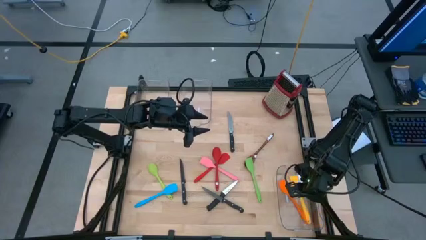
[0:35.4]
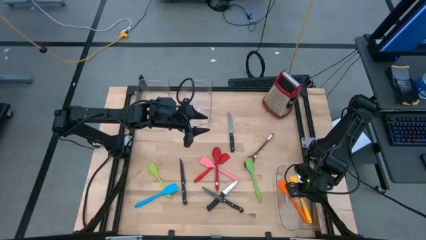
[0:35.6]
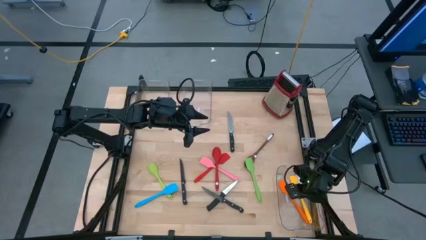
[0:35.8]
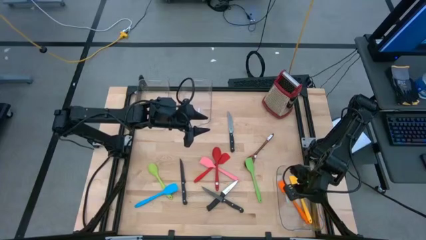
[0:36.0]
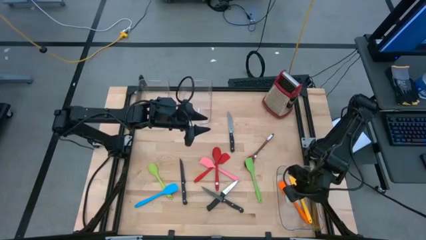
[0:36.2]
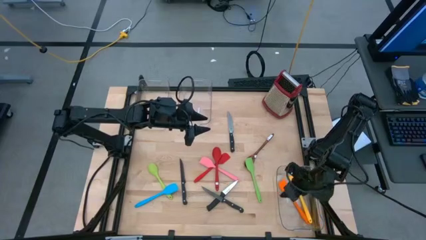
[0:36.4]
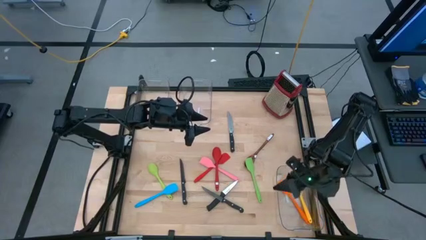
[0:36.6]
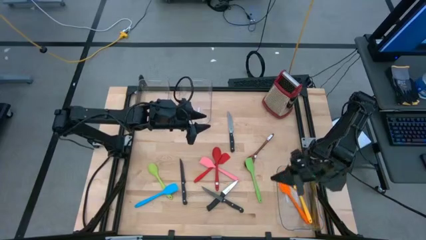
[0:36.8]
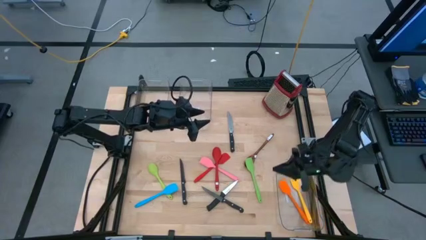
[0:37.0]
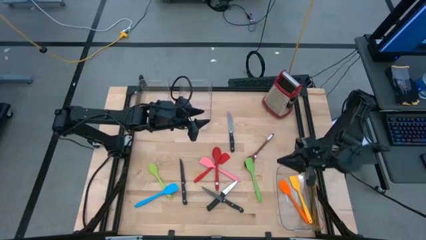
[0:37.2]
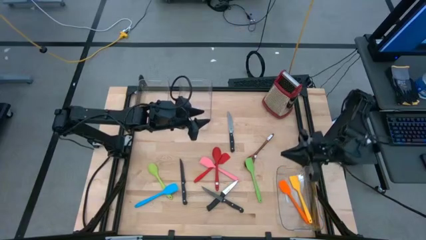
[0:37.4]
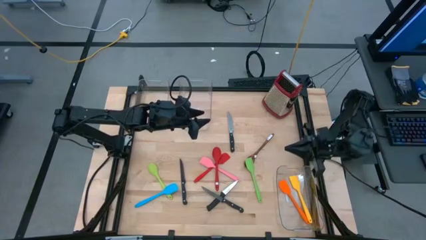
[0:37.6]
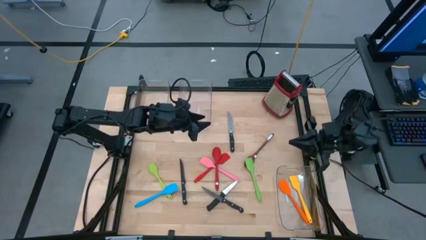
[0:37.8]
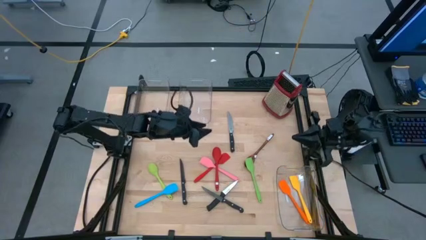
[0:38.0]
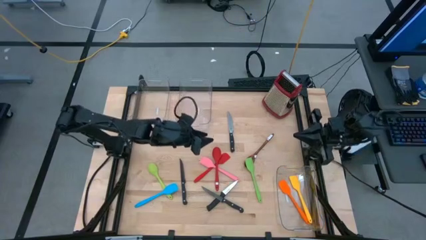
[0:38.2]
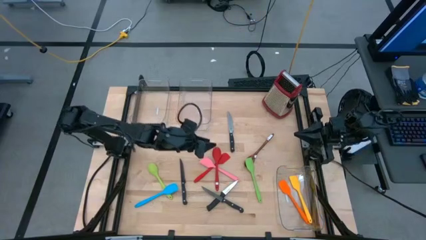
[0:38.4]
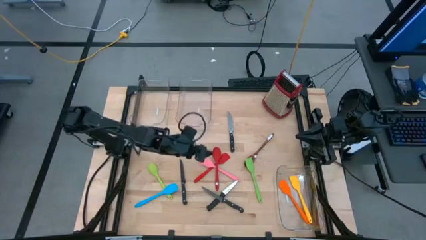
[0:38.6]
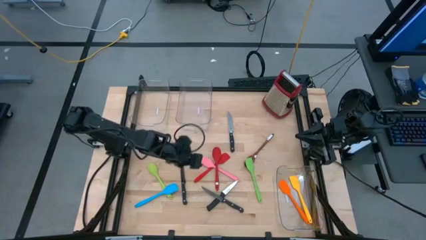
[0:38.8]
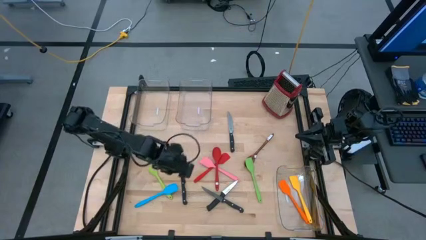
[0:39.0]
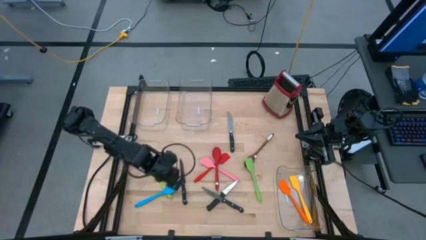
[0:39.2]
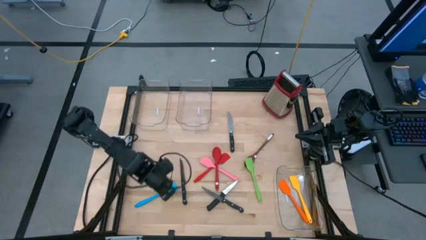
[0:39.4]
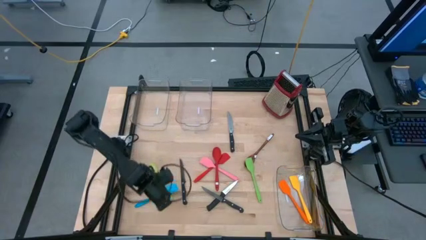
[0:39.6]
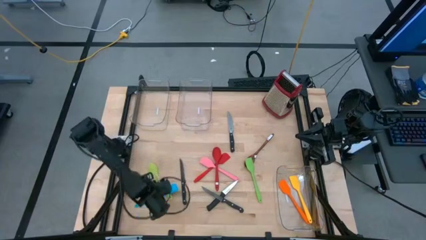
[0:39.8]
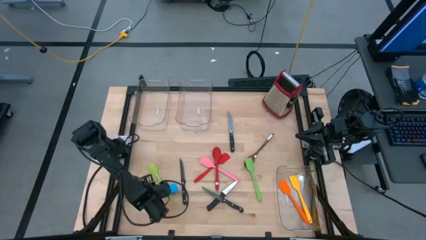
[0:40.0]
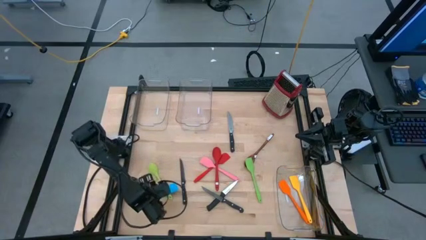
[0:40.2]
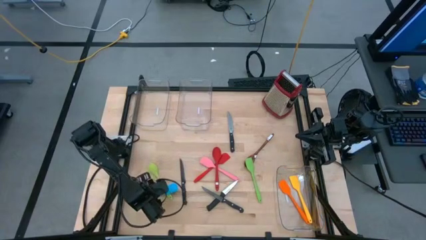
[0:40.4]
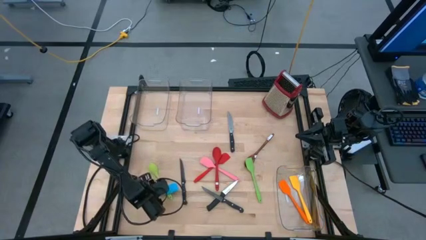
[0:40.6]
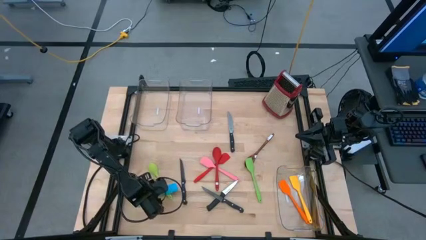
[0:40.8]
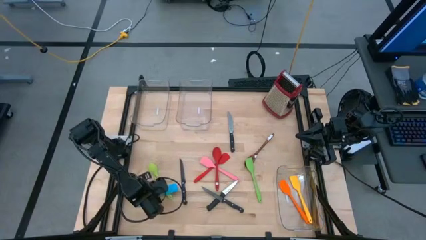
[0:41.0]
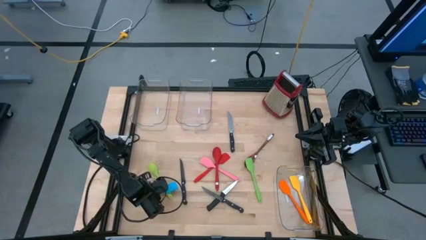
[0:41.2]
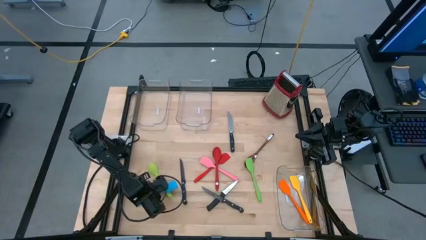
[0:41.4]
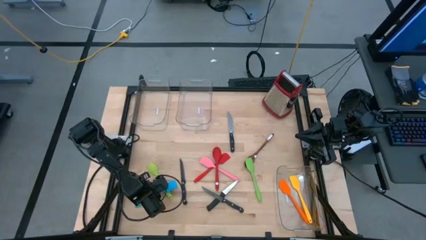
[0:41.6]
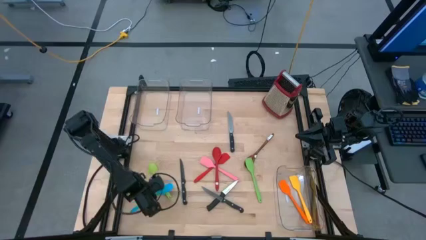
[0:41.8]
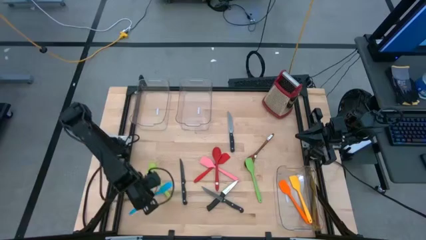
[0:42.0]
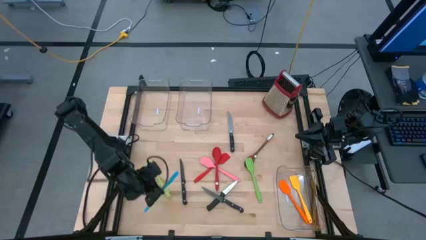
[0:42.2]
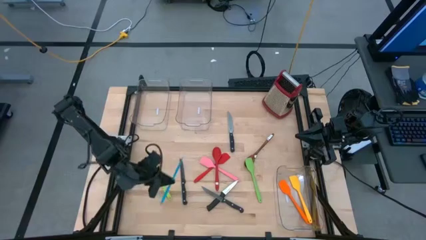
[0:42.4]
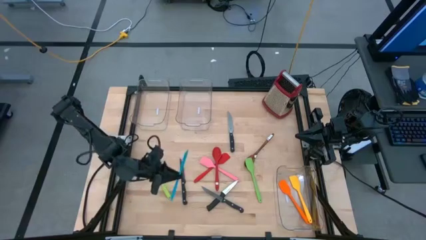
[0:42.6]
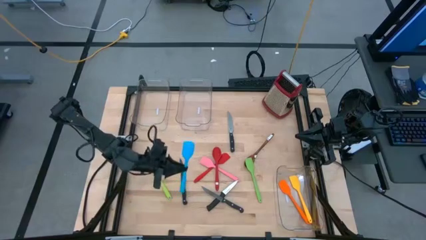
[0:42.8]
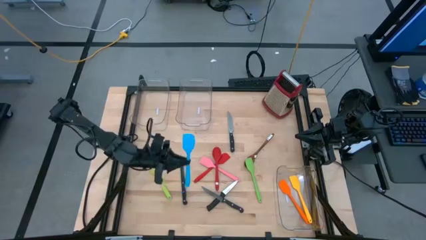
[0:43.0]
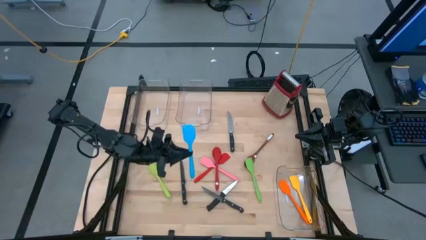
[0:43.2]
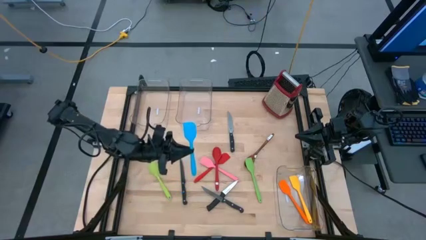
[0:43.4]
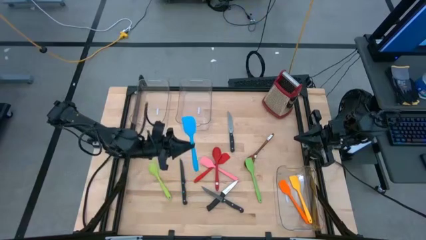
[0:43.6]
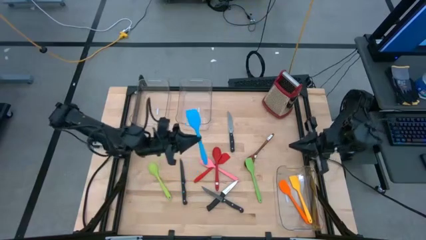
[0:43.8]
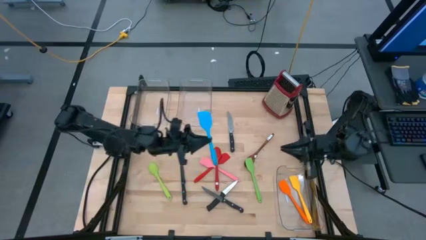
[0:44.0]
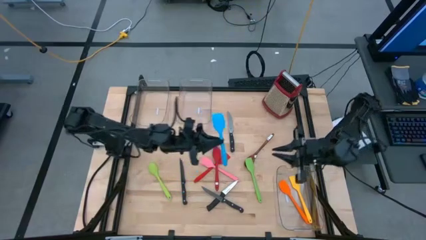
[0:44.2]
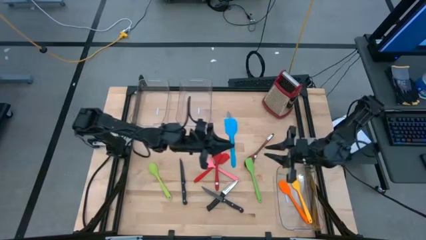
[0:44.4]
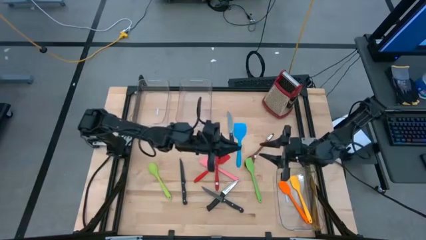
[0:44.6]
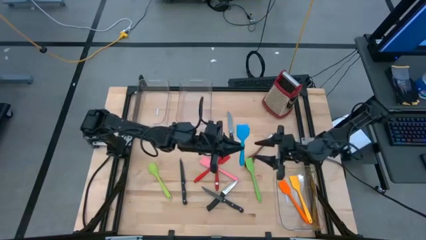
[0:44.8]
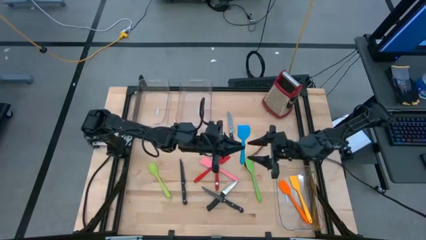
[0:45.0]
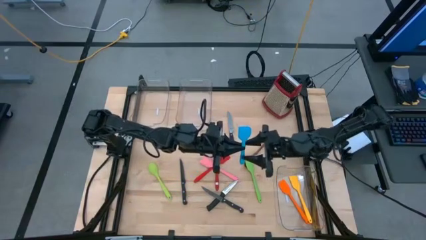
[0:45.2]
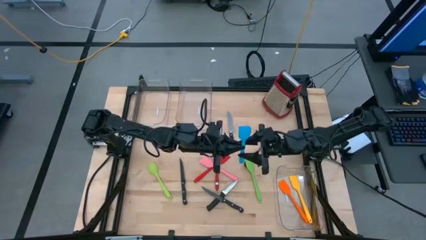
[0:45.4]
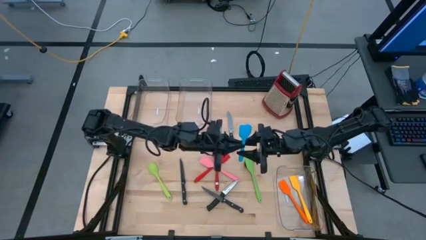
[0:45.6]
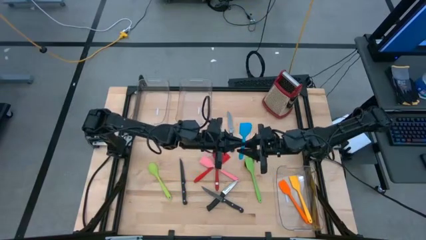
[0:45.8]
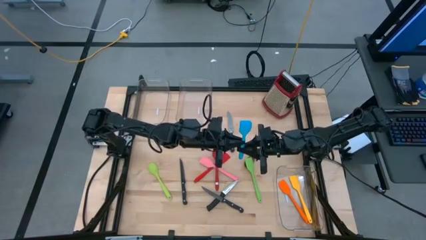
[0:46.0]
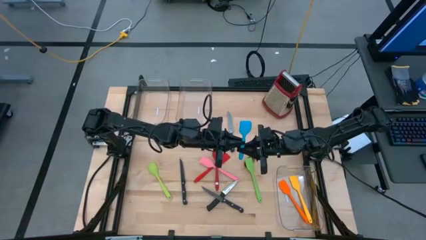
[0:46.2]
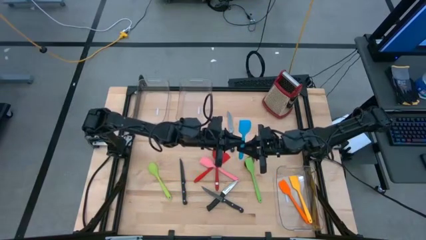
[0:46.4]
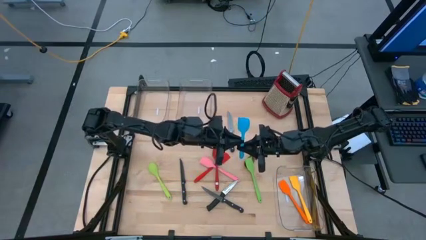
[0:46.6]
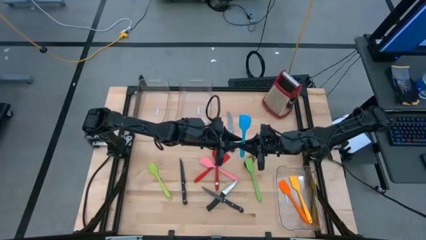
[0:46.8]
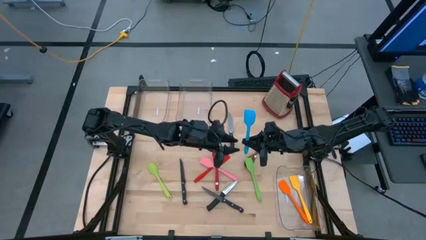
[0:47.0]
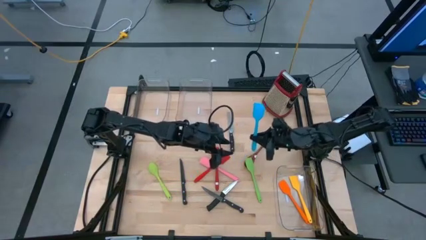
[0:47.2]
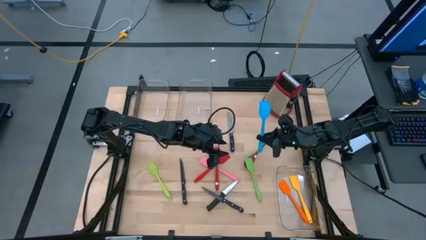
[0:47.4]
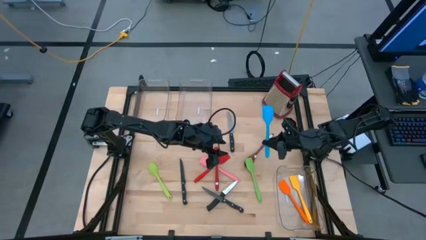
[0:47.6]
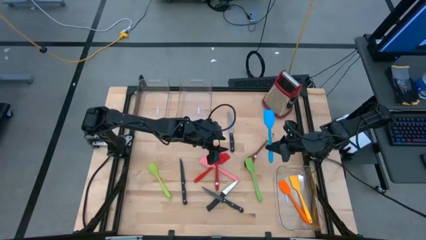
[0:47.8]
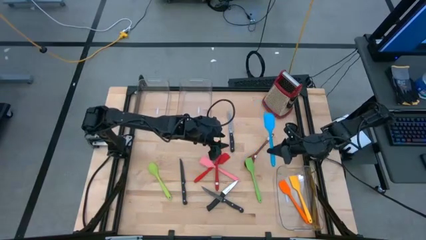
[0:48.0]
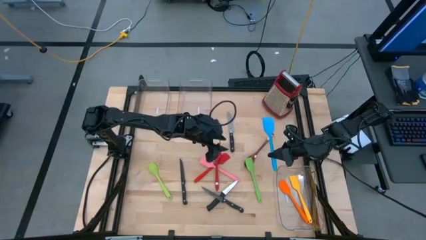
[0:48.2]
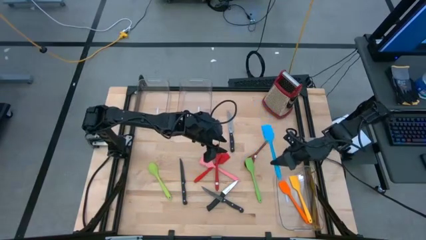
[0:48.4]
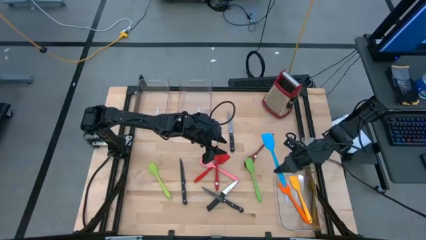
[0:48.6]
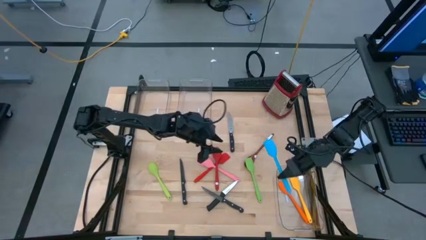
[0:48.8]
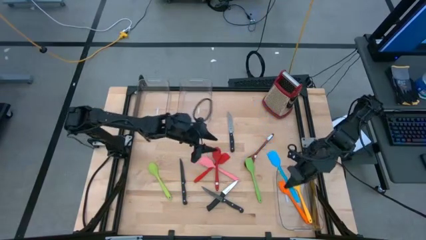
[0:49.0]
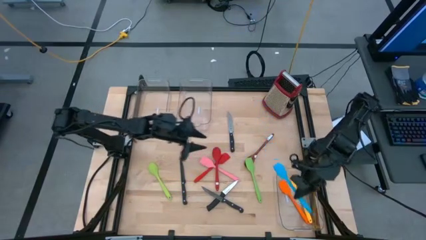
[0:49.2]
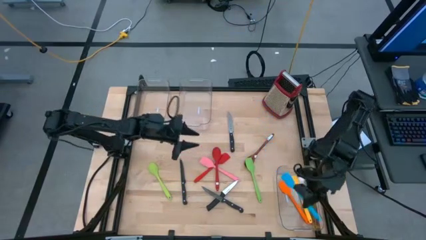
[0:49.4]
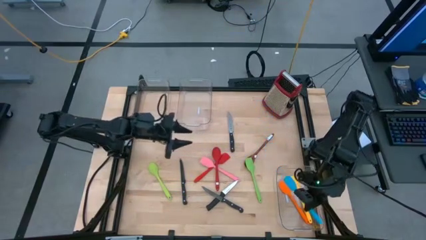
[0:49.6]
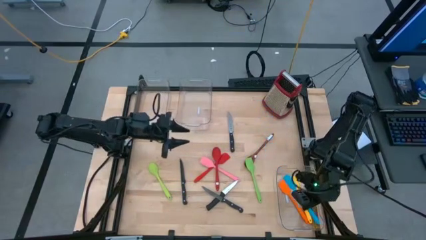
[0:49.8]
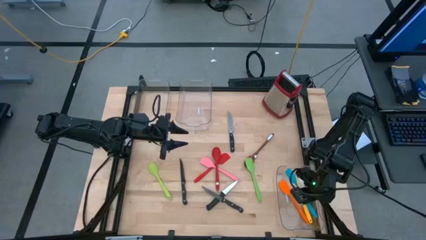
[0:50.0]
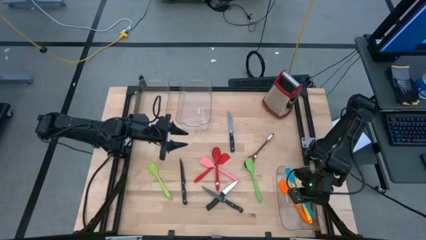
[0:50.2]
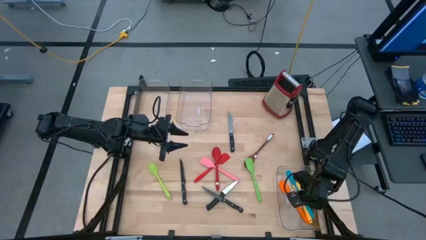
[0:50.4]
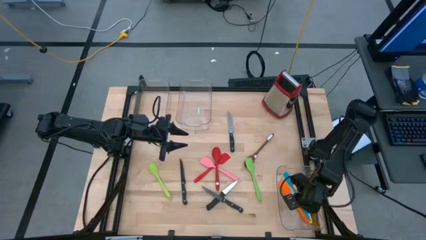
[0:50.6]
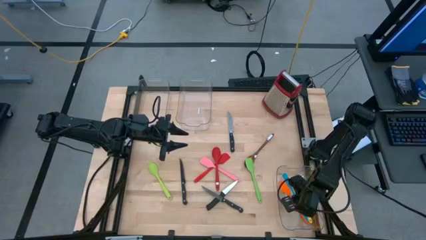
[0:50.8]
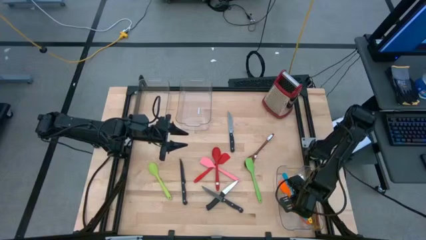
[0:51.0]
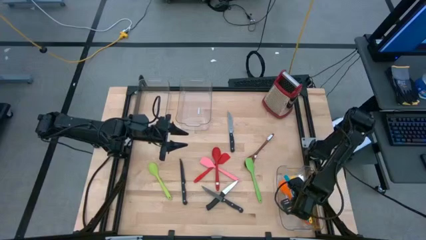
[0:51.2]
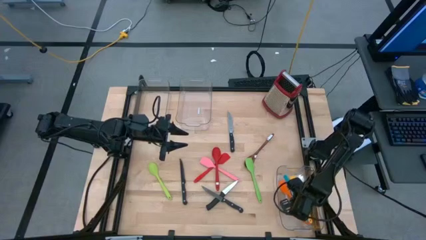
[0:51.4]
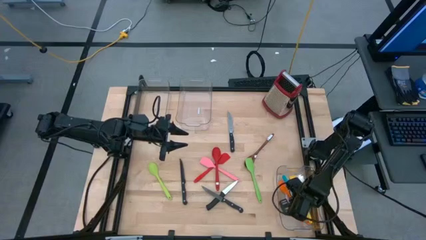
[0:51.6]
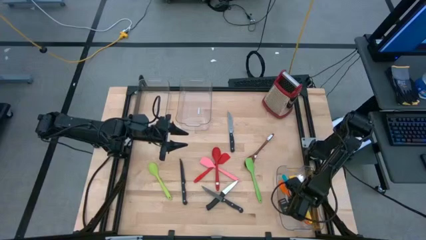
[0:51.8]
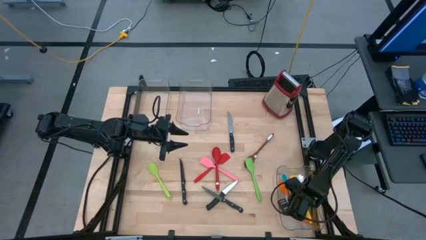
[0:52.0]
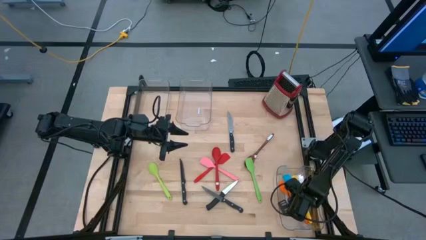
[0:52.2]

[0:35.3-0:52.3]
Task: Pick & Place Kitchen Items
Put the blue spatula into the bottom transparent bin
